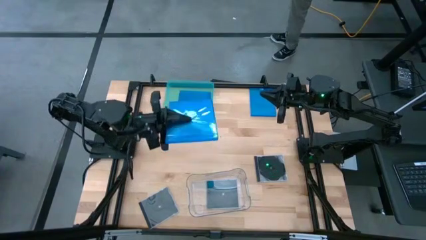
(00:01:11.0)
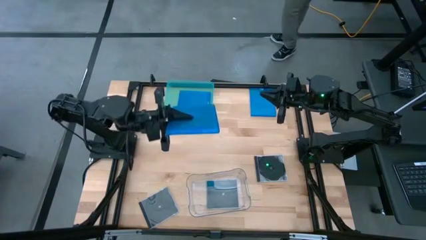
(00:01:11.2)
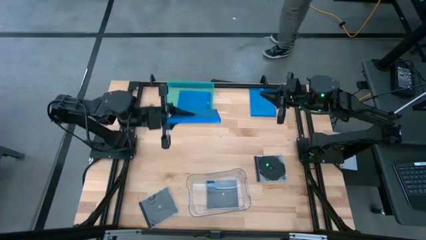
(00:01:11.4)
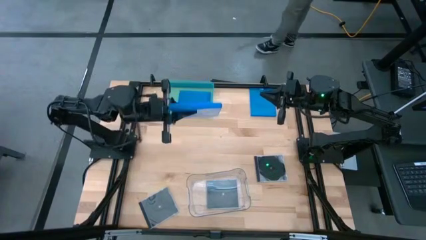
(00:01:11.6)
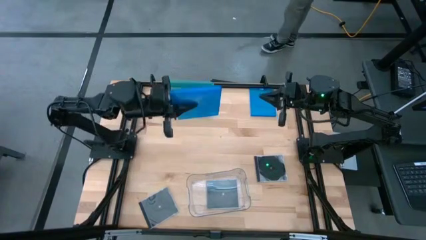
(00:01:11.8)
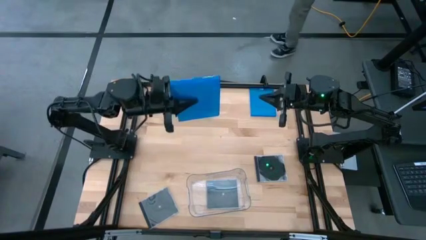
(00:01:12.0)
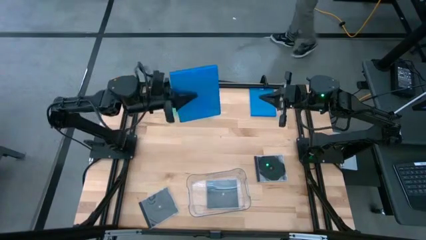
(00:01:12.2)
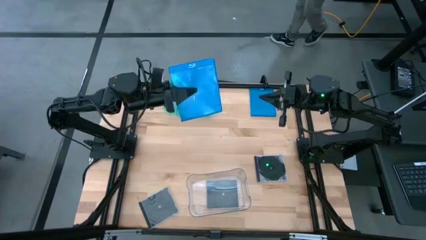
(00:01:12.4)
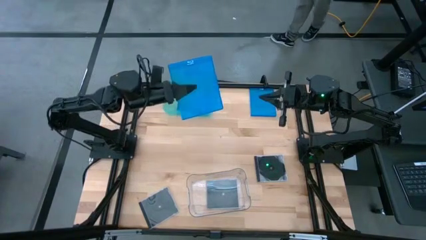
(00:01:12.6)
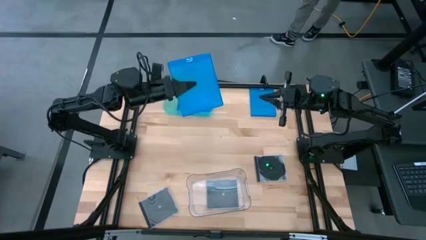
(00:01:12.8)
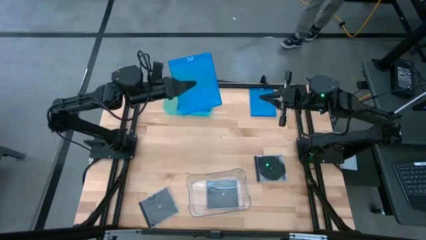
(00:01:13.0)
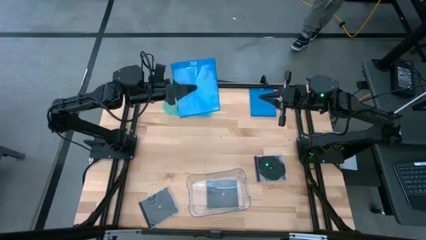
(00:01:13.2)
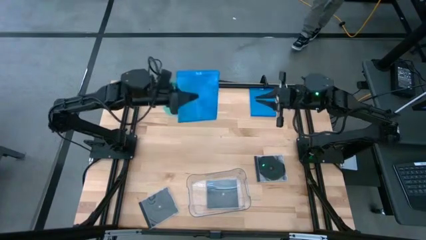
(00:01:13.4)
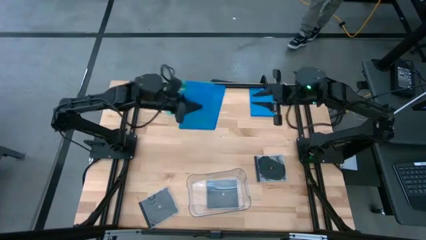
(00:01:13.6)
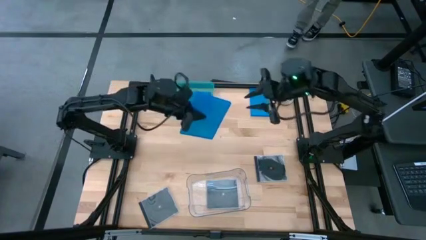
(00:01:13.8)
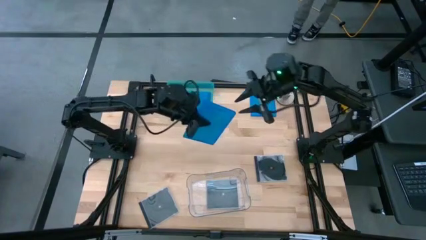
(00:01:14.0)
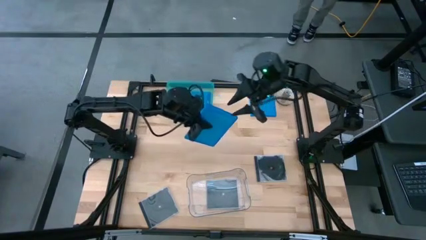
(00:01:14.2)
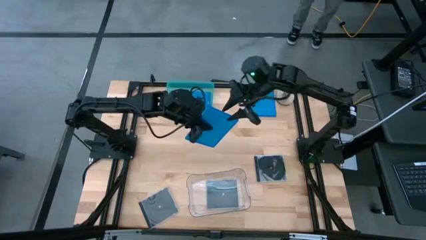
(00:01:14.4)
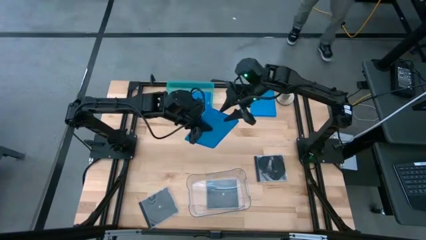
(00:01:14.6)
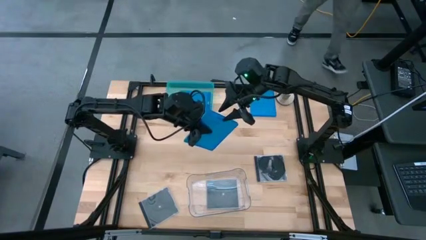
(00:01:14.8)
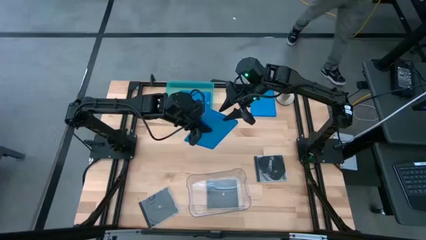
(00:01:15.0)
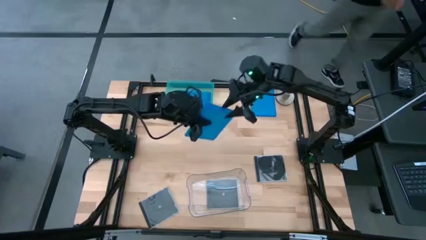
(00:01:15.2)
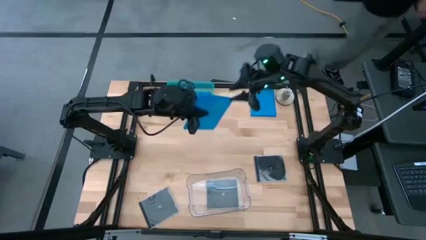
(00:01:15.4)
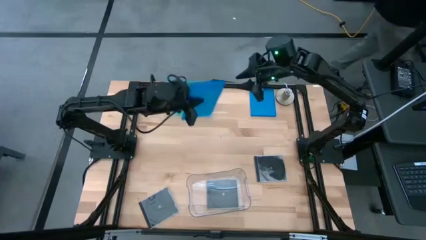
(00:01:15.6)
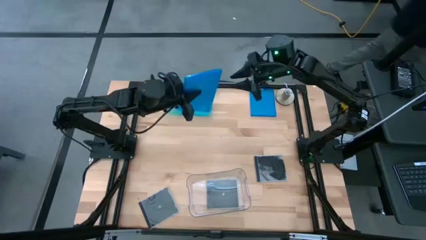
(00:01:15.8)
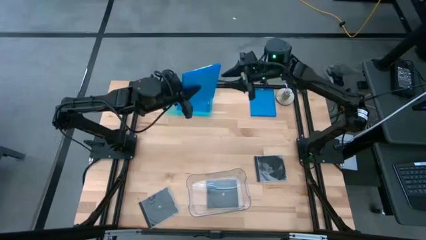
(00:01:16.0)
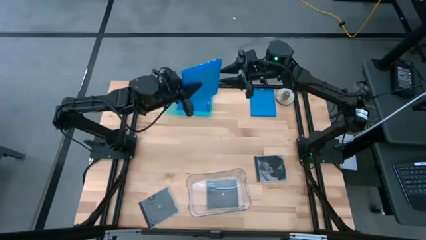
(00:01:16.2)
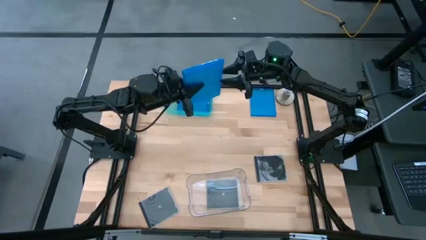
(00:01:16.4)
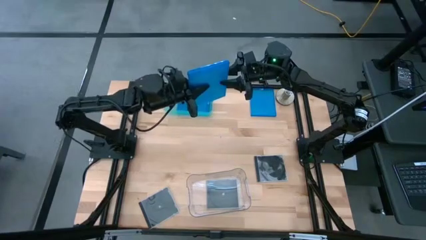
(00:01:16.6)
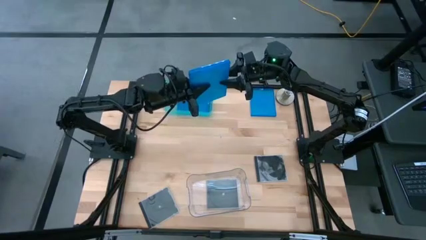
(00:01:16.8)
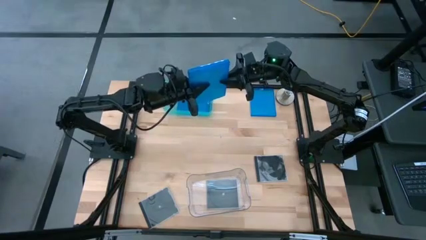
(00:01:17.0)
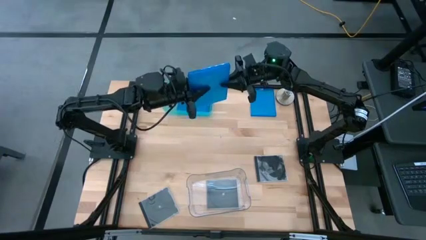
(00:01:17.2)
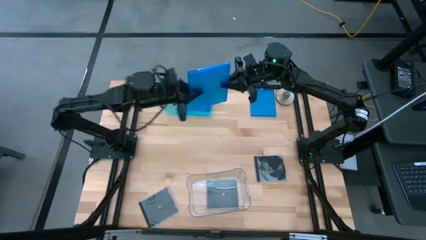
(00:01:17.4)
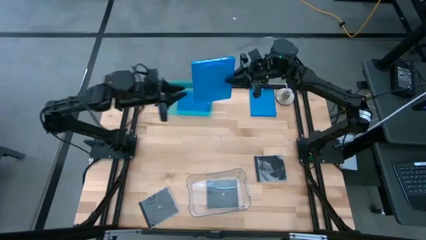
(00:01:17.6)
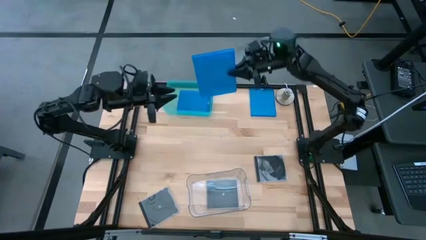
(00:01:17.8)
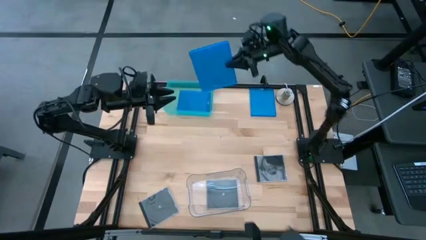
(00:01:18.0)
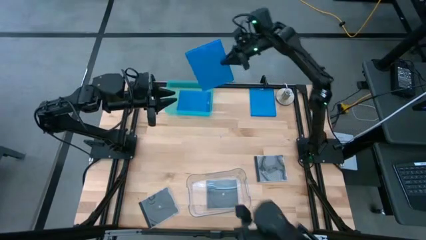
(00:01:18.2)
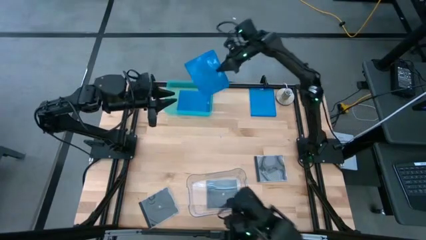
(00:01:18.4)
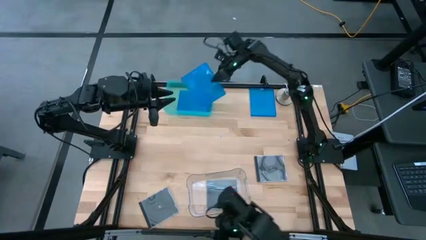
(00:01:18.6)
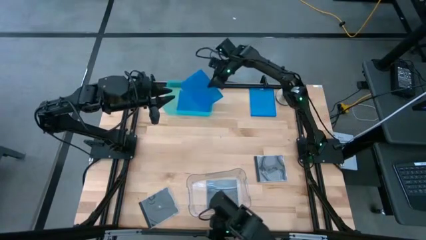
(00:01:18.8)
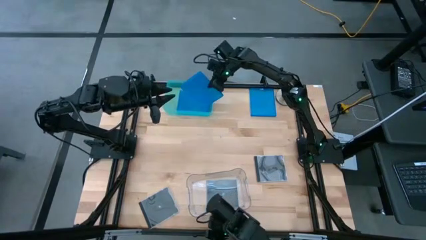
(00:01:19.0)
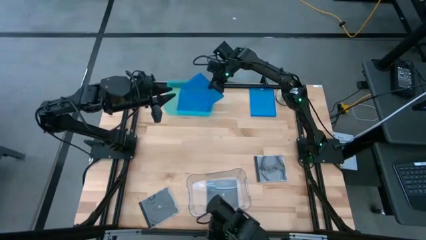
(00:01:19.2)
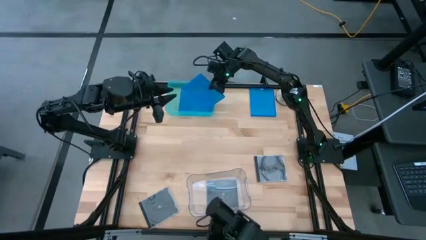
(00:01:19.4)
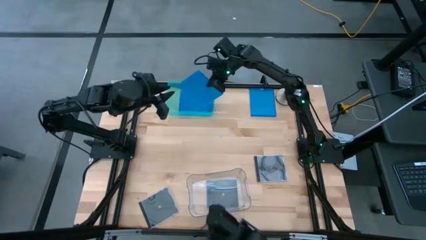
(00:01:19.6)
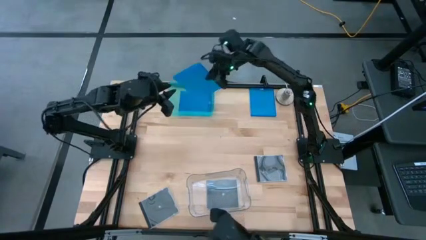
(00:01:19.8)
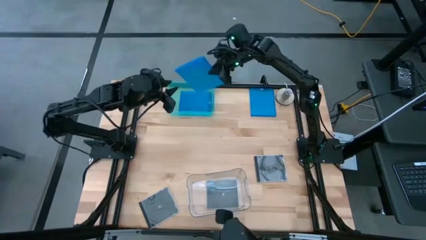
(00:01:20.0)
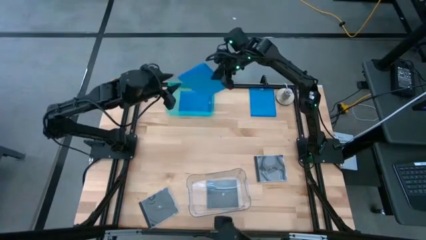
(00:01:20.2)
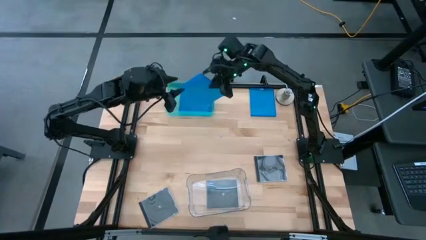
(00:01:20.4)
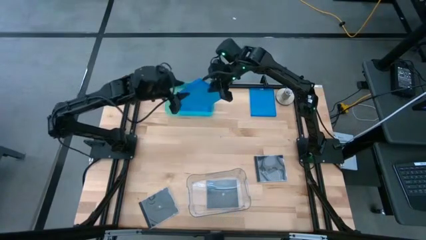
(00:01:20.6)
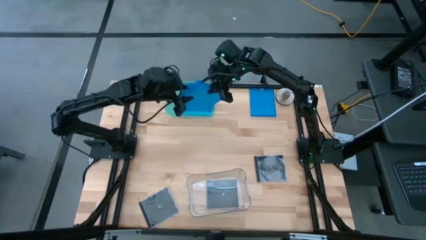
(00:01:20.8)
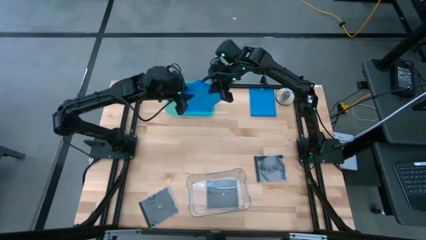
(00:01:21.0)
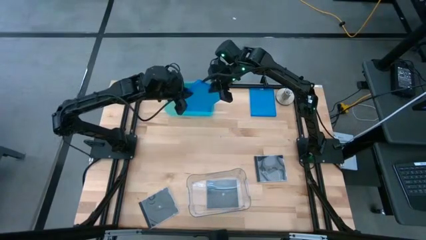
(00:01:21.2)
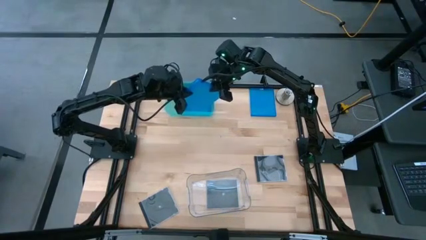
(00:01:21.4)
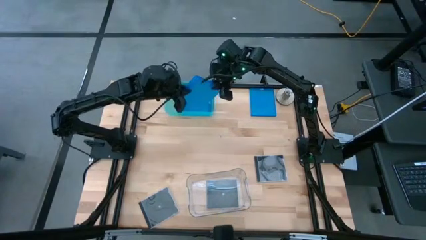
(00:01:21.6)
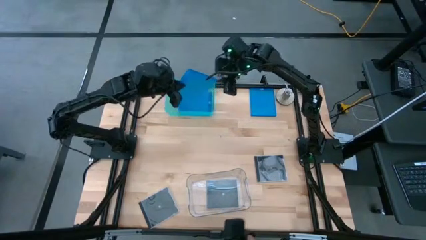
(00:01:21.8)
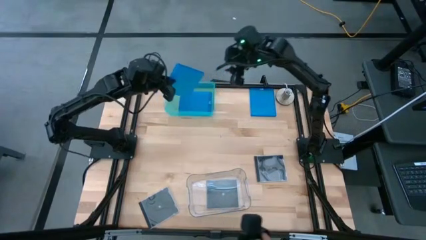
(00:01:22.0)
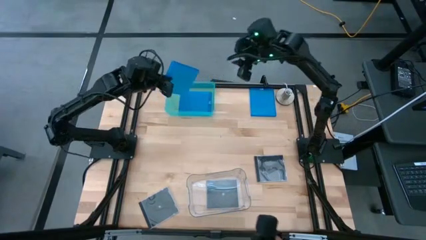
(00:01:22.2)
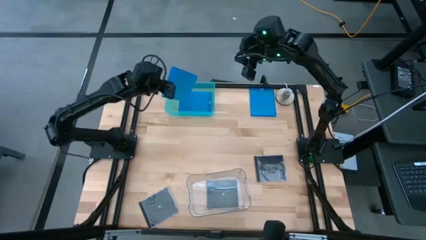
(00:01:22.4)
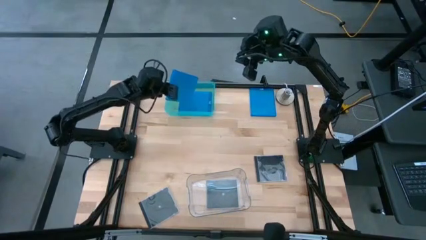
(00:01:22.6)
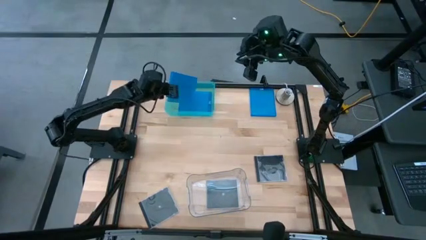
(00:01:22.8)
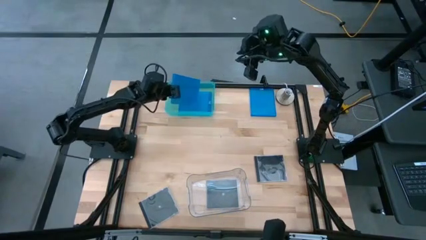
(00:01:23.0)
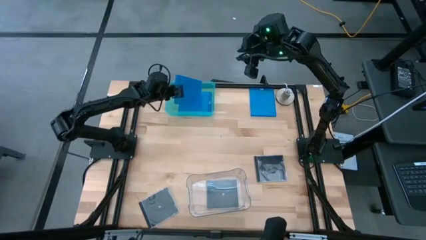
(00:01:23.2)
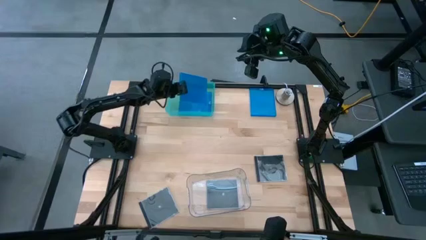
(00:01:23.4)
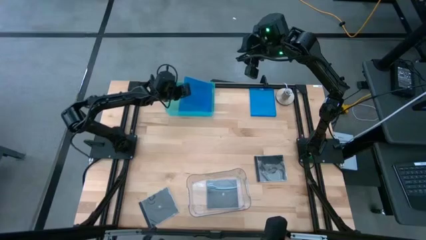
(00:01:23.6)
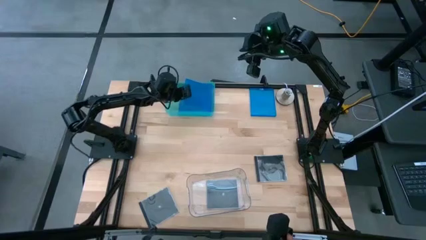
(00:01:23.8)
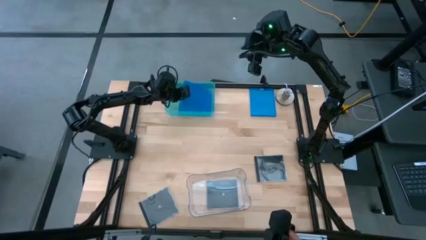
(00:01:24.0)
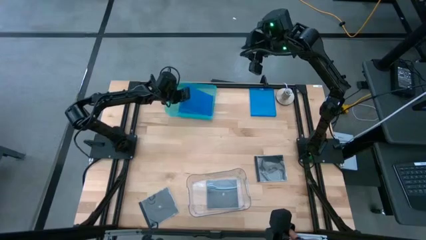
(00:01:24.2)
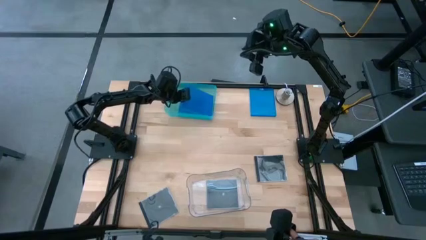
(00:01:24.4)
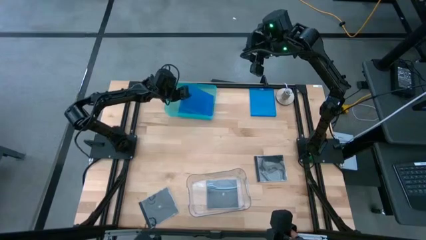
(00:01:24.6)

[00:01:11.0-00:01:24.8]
Task: Pick & place jewel cases by type
Put the bottom blue CD case into the green bin
